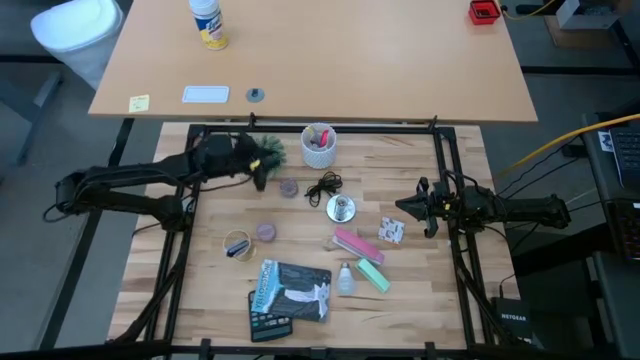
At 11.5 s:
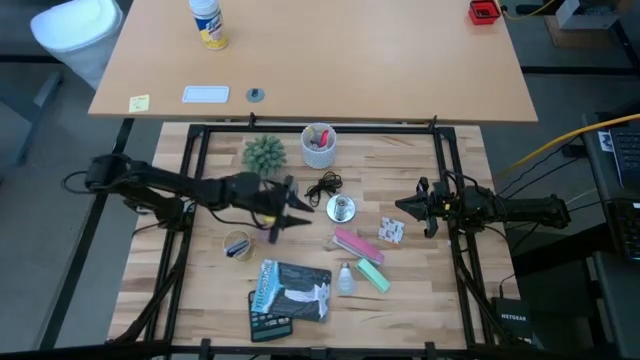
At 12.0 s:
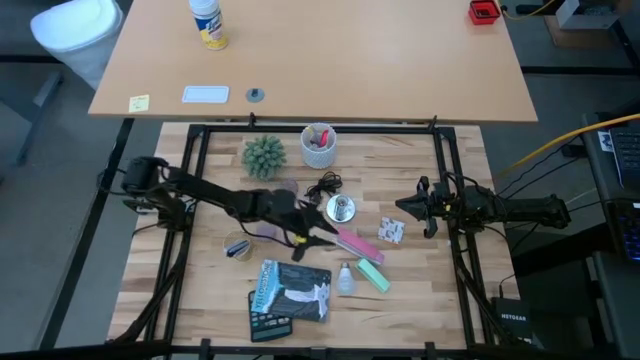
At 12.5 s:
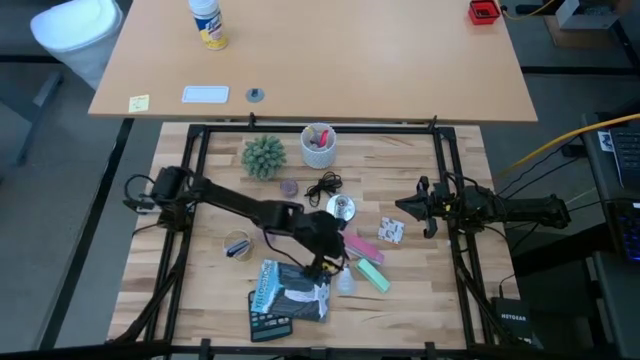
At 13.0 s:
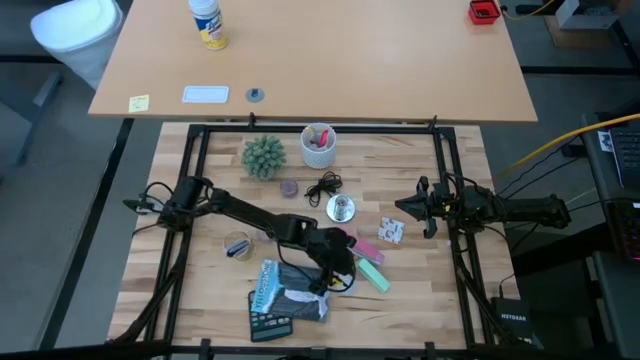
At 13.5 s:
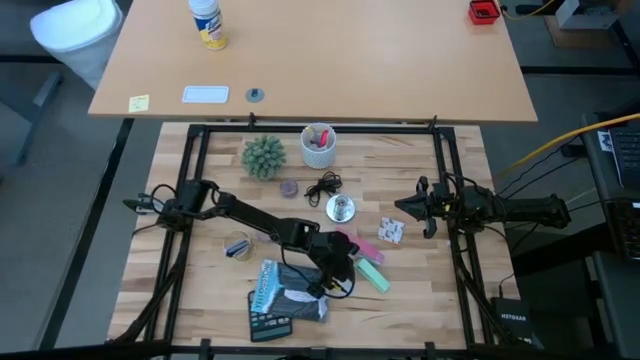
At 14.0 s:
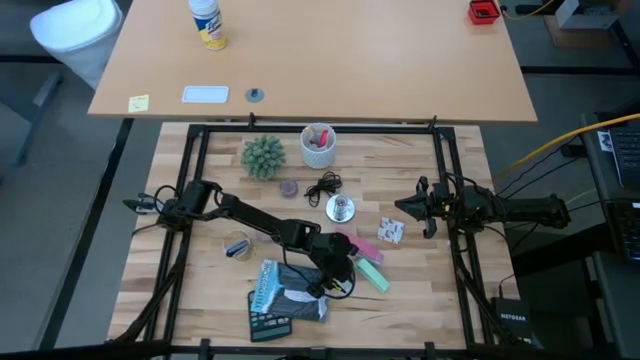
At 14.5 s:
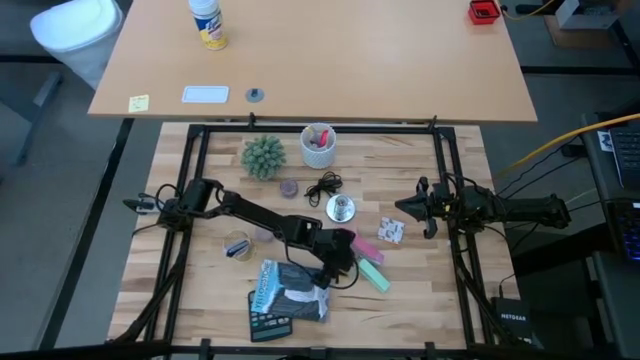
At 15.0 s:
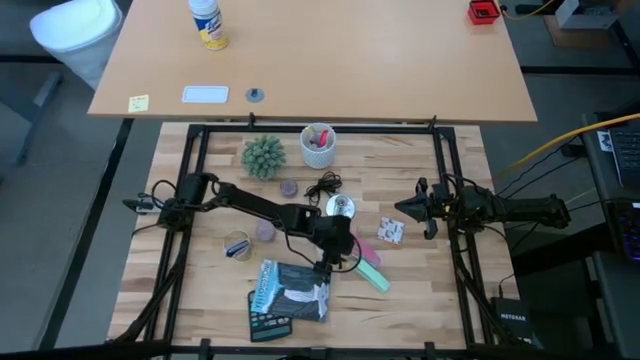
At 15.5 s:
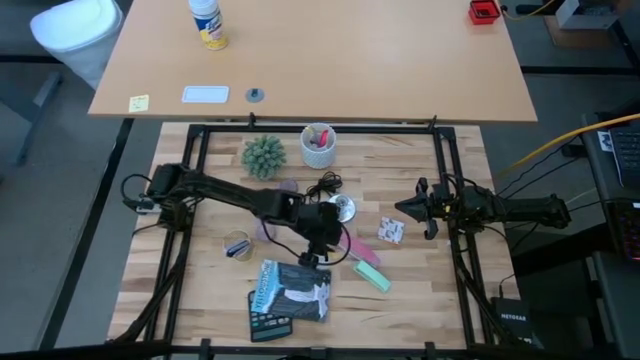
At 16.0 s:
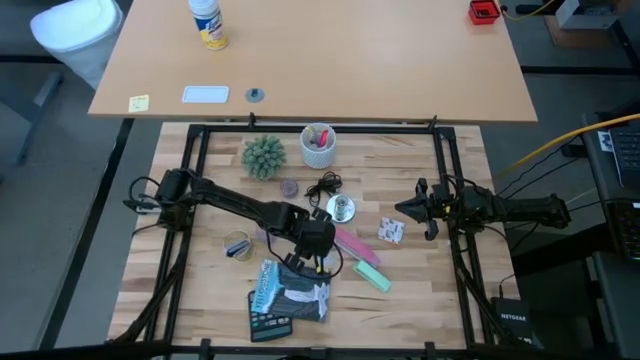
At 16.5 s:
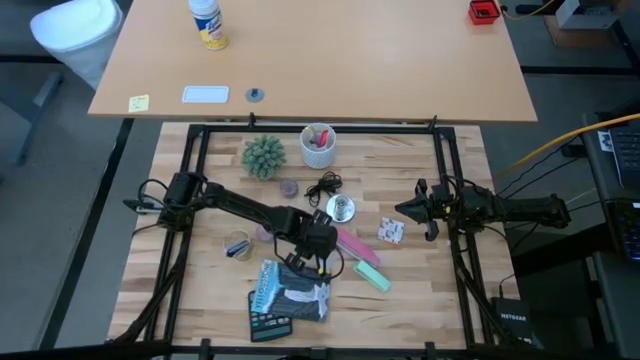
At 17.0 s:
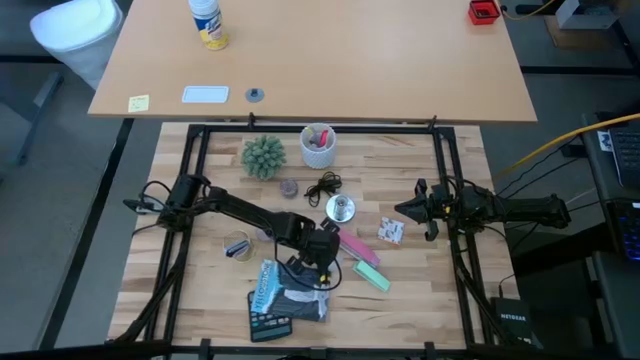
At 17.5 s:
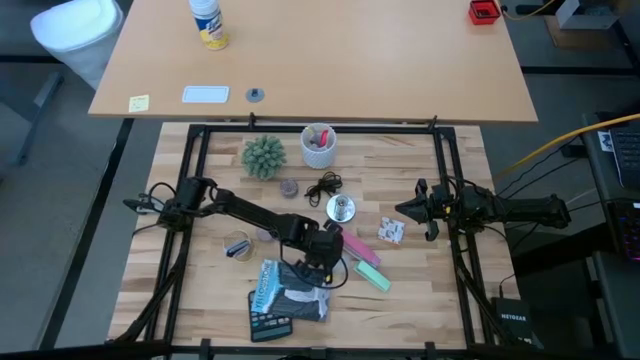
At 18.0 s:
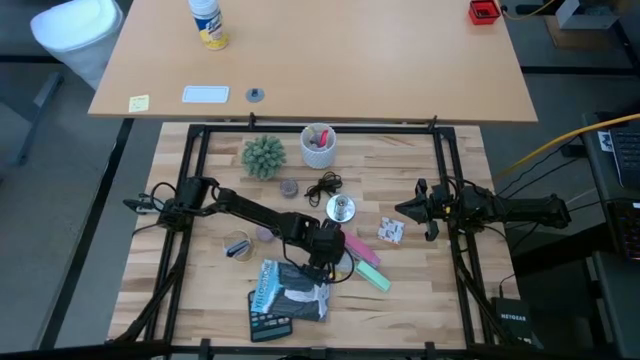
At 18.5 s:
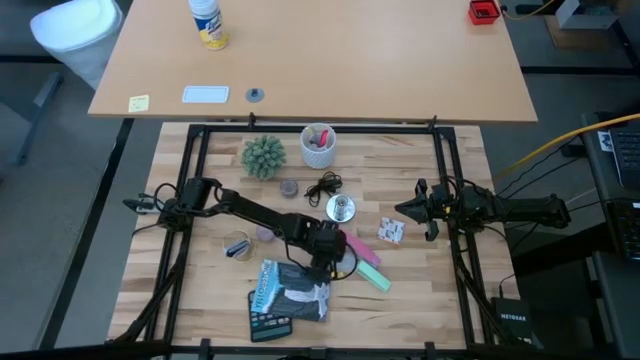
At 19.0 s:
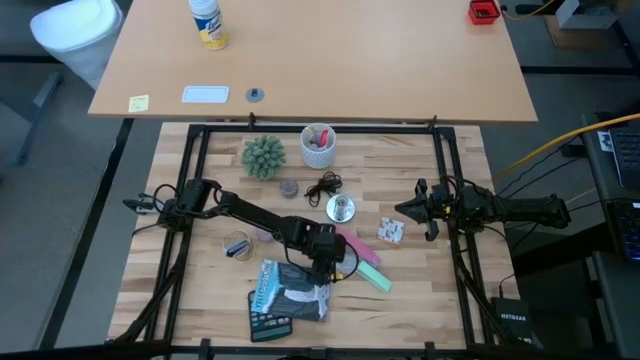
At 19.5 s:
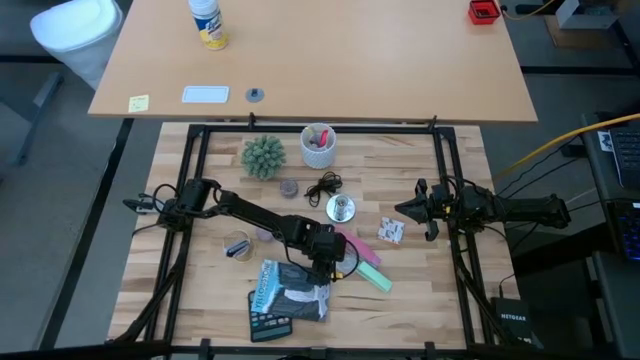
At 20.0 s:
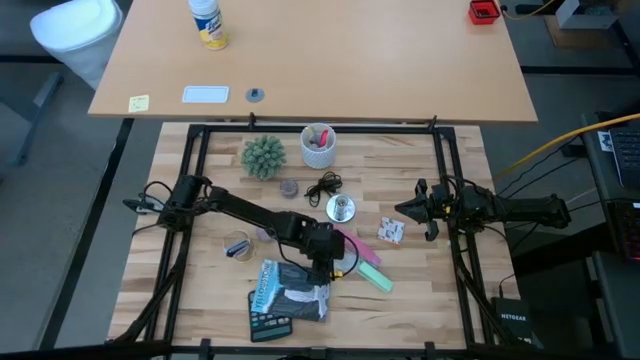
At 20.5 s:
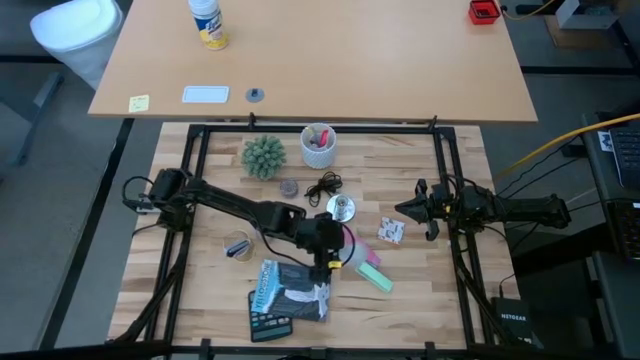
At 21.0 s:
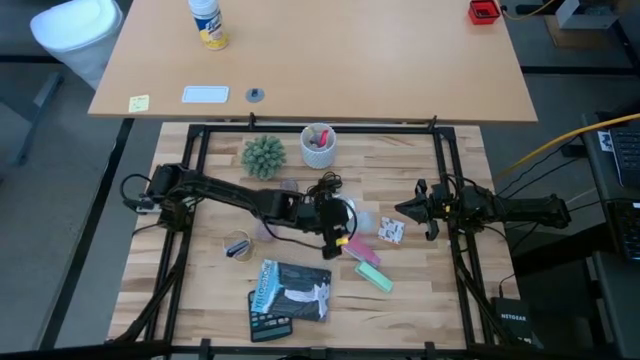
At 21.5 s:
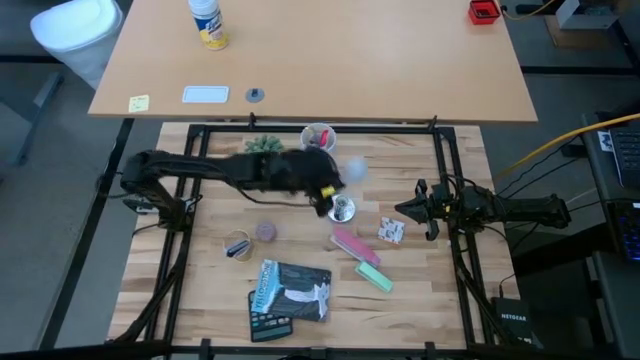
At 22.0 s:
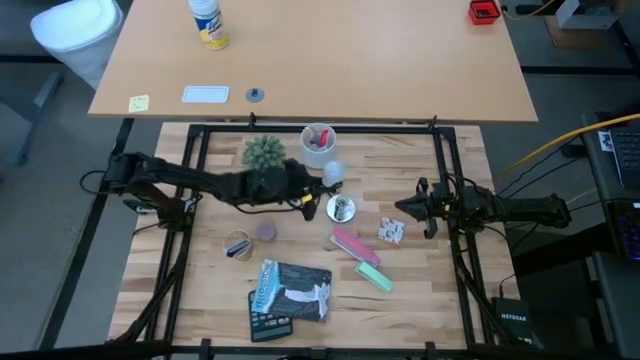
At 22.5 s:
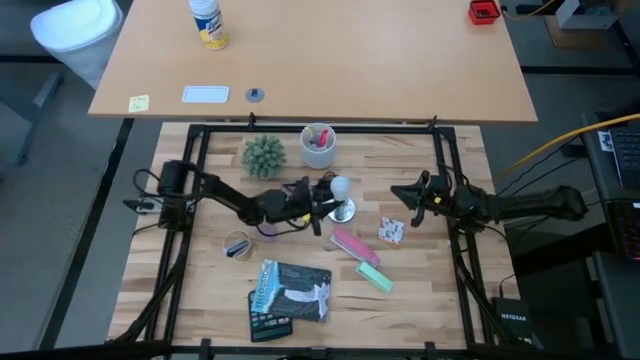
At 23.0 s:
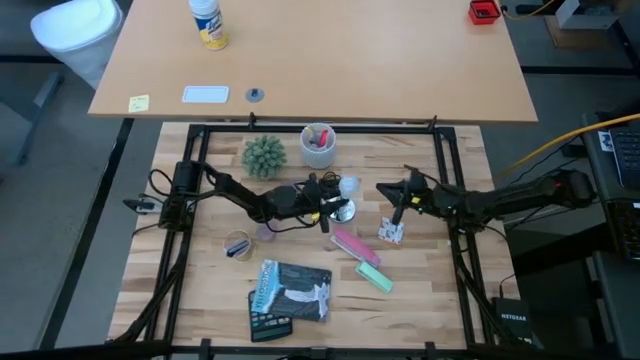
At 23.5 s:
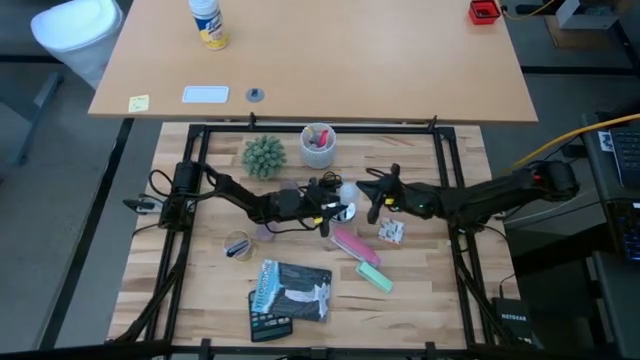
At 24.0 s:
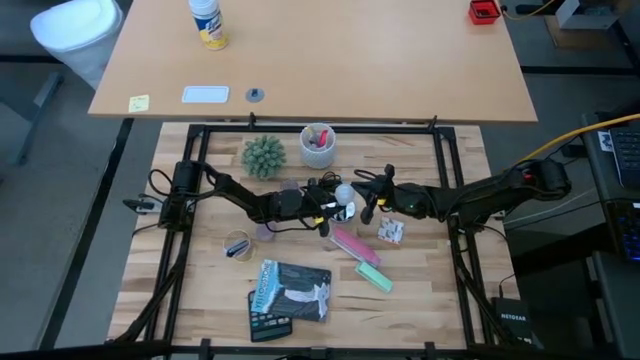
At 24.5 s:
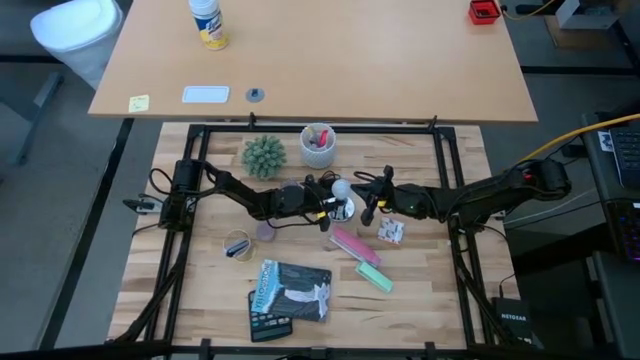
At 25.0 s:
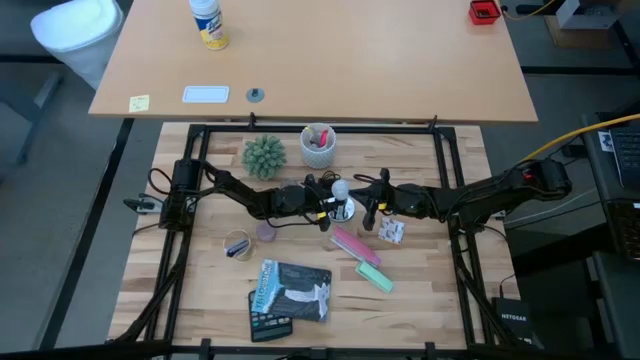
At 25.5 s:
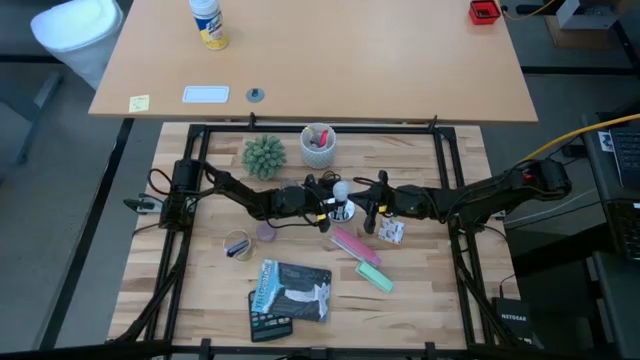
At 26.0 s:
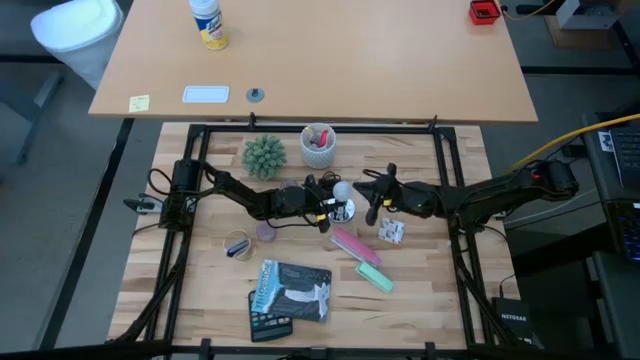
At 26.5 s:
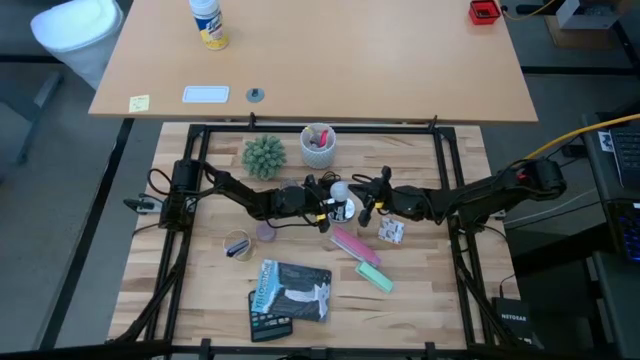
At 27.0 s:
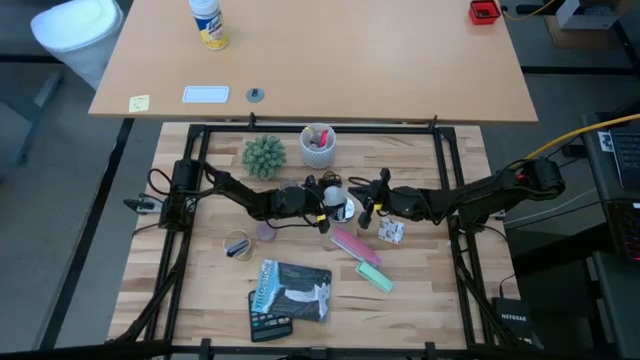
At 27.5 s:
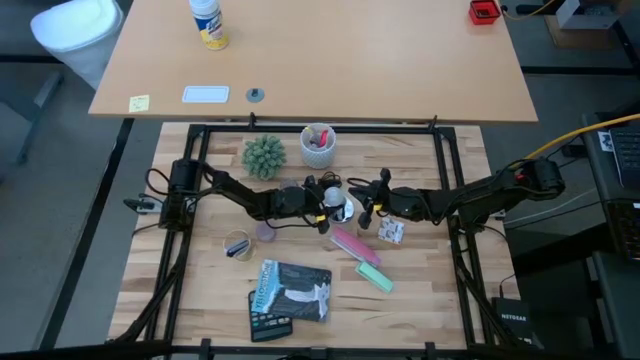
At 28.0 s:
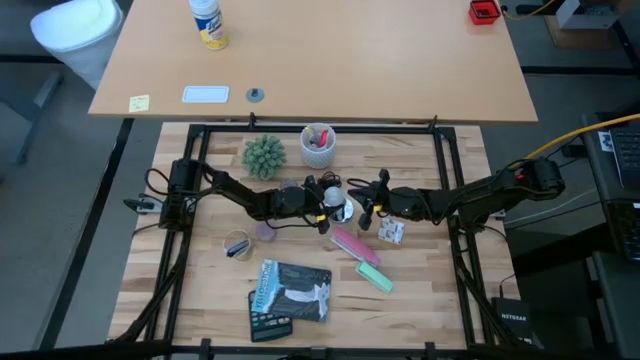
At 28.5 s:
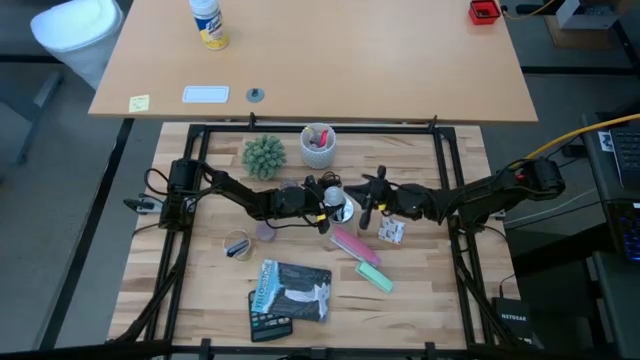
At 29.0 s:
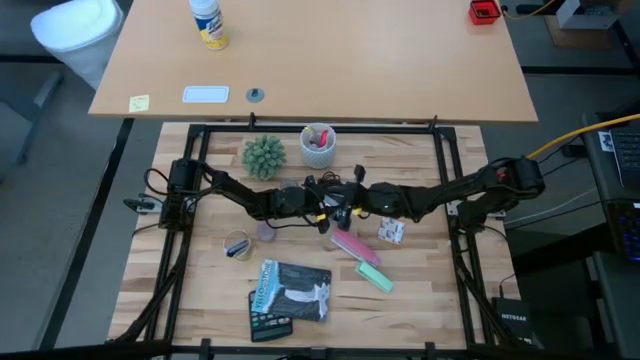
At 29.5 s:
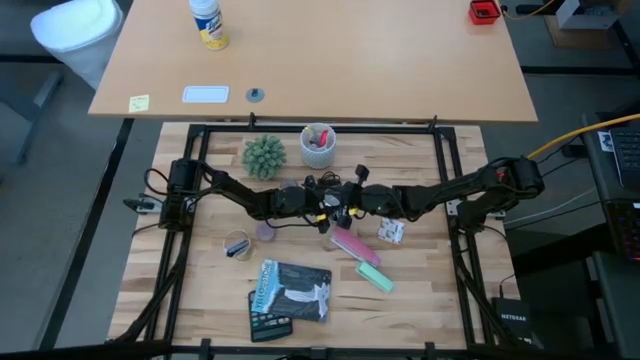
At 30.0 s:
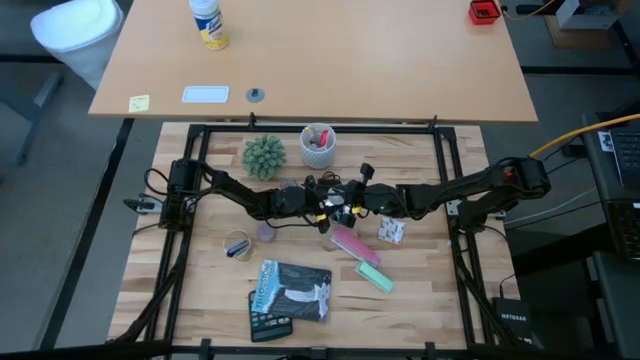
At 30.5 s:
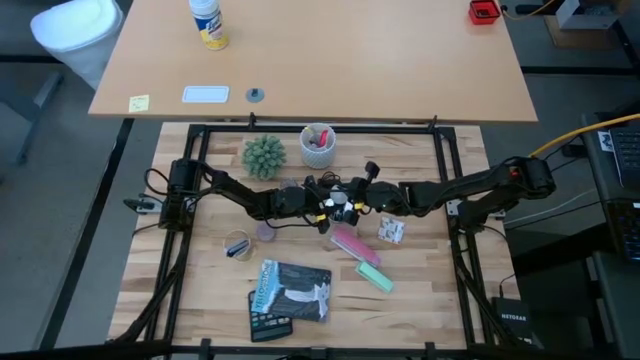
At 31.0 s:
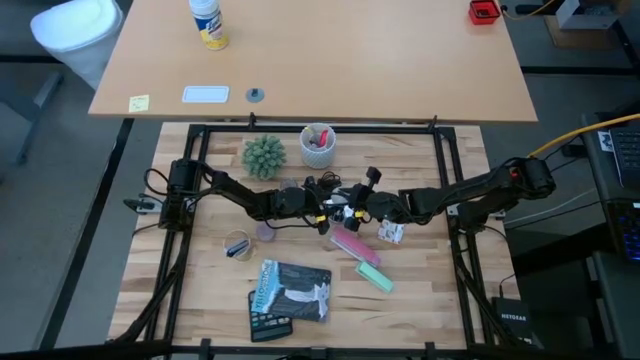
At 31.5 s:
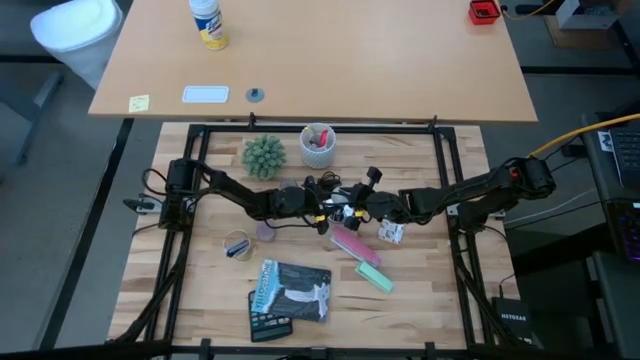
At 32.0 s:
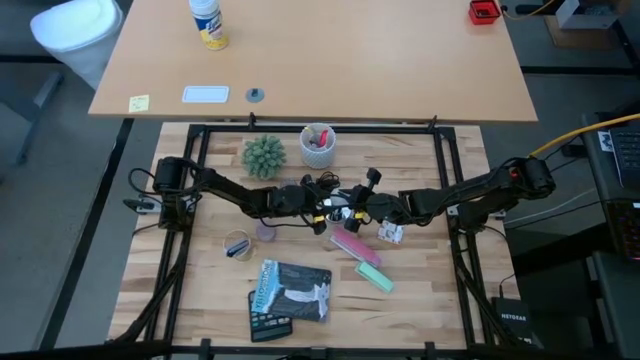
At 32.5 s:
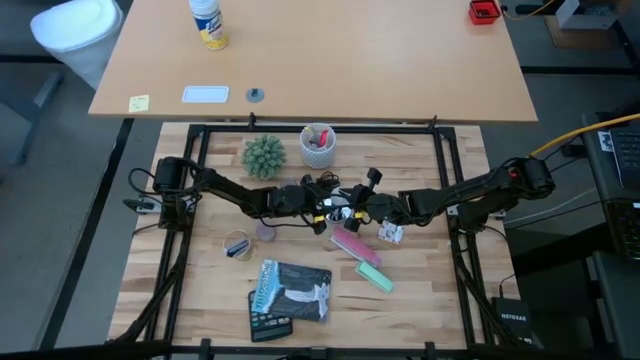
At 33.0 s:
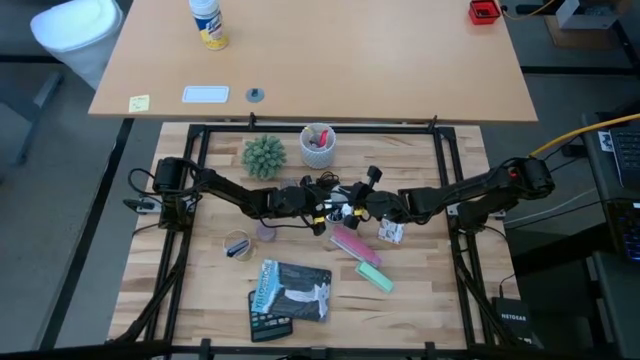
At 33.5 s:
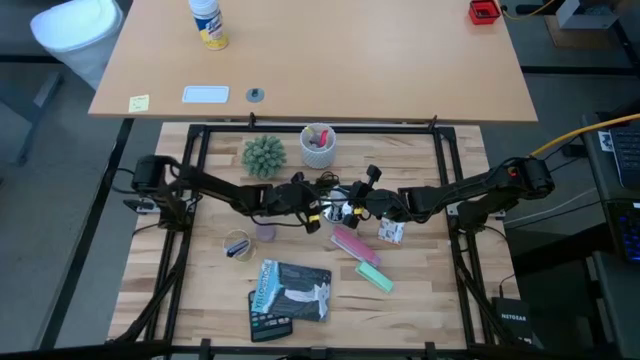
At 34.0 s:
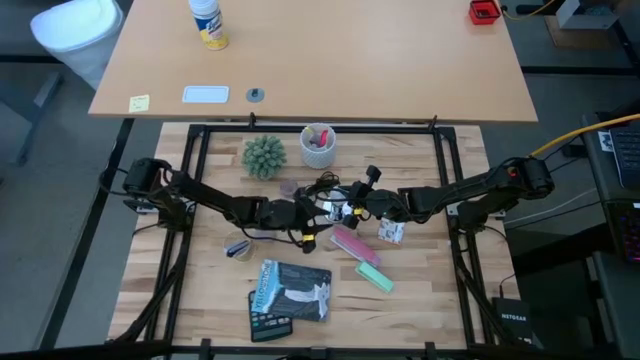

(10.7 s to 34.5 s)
Task: Screw lightbulb
Insert the lightbulb into the lamp
